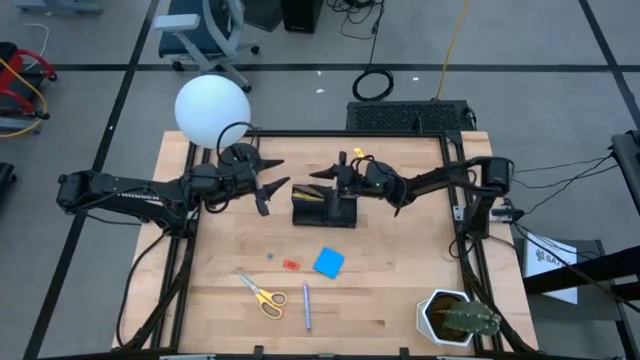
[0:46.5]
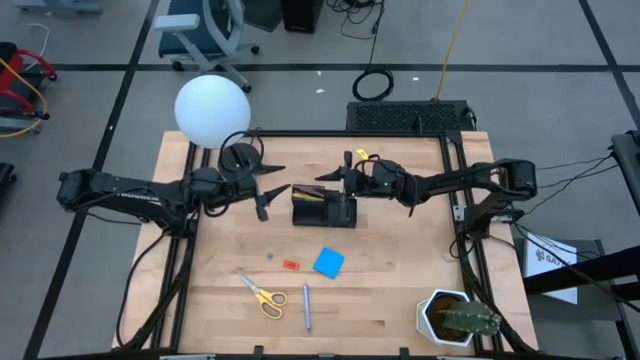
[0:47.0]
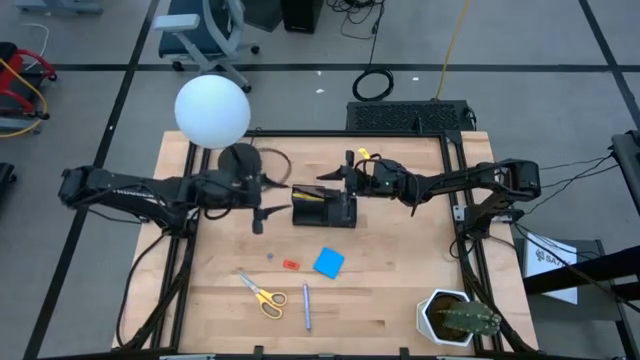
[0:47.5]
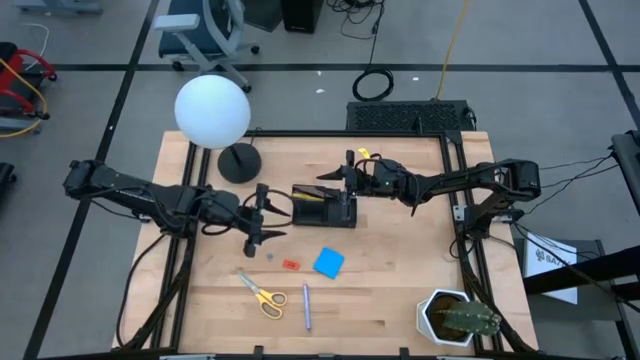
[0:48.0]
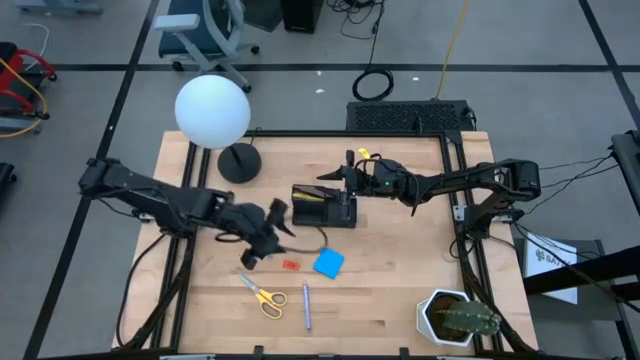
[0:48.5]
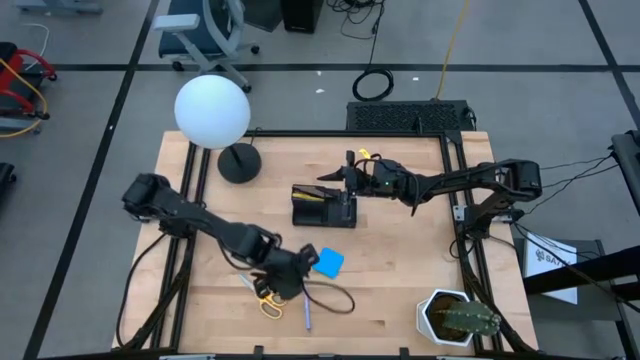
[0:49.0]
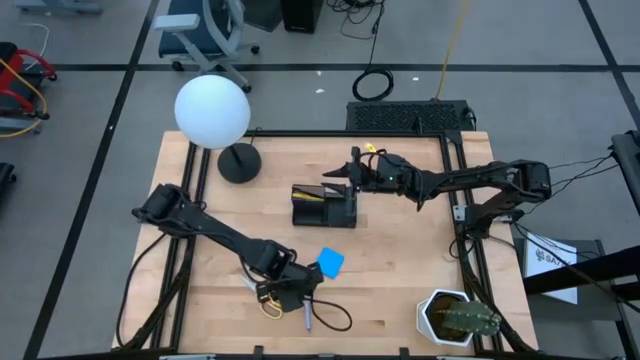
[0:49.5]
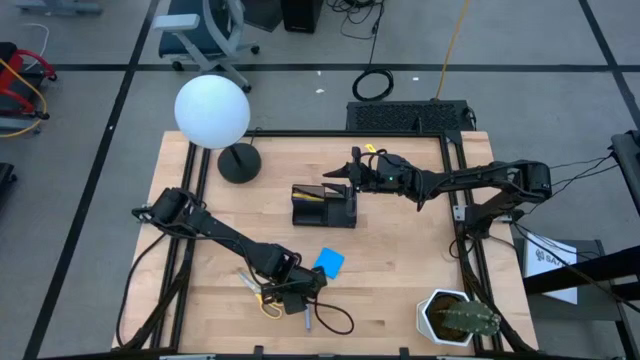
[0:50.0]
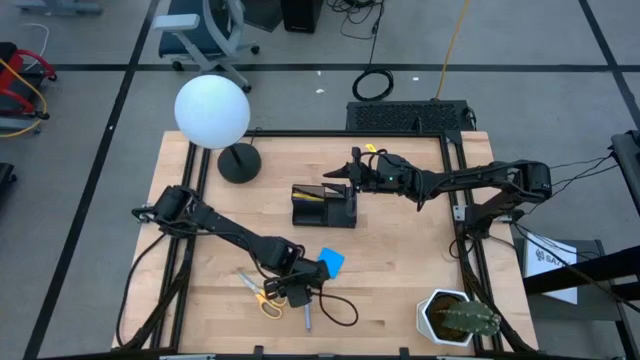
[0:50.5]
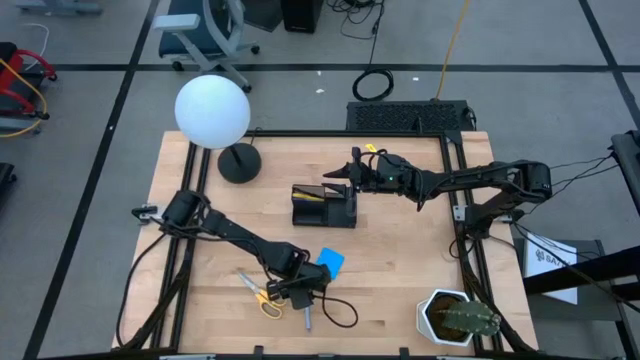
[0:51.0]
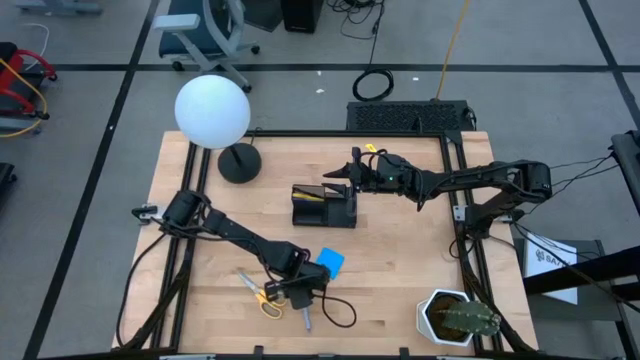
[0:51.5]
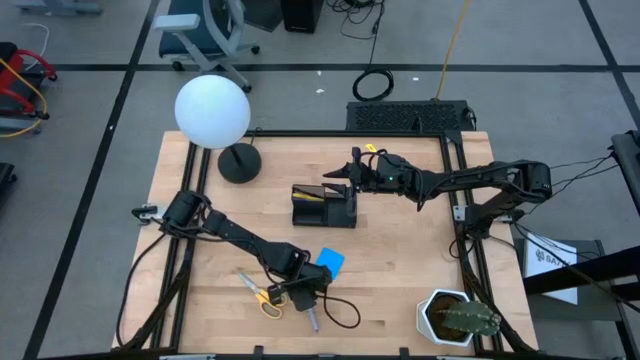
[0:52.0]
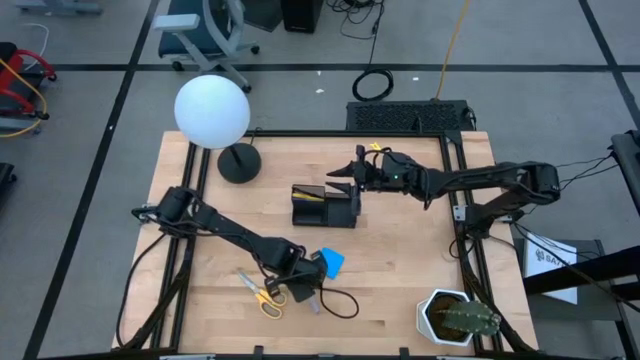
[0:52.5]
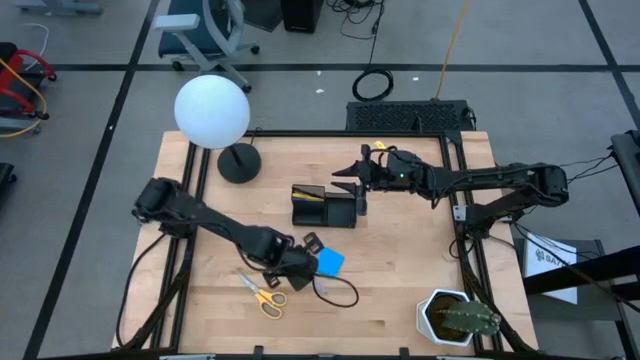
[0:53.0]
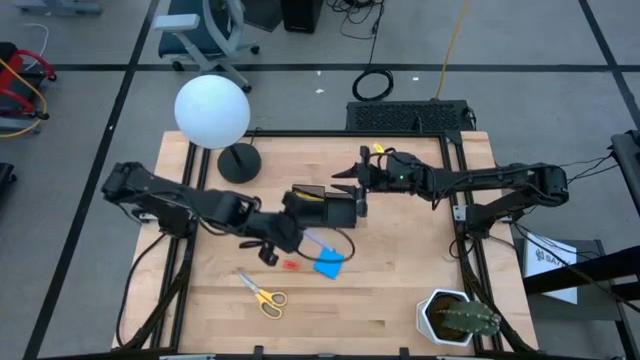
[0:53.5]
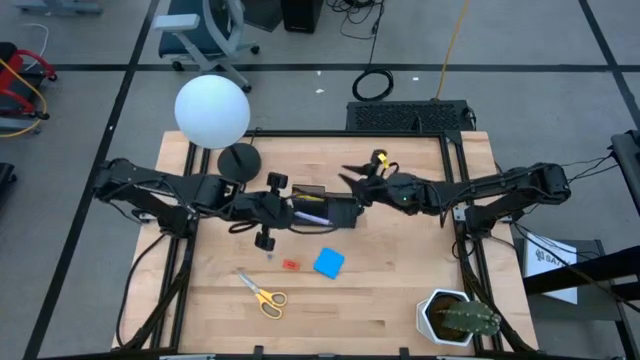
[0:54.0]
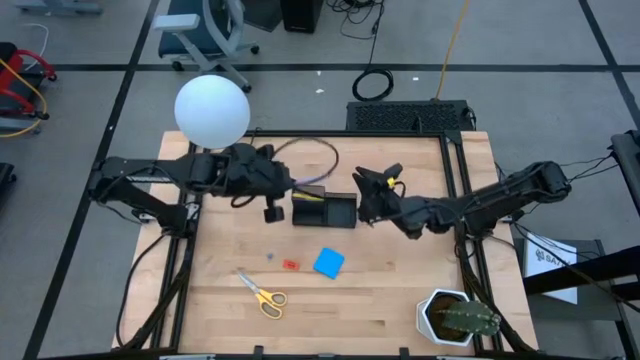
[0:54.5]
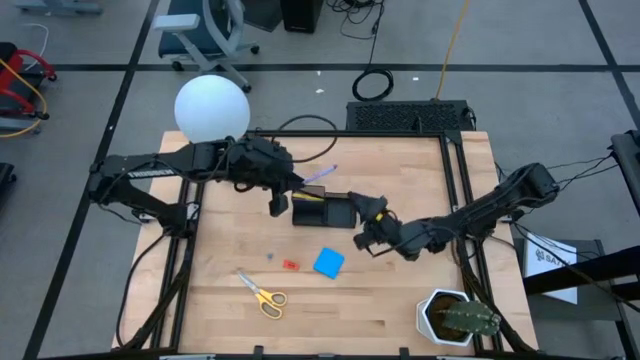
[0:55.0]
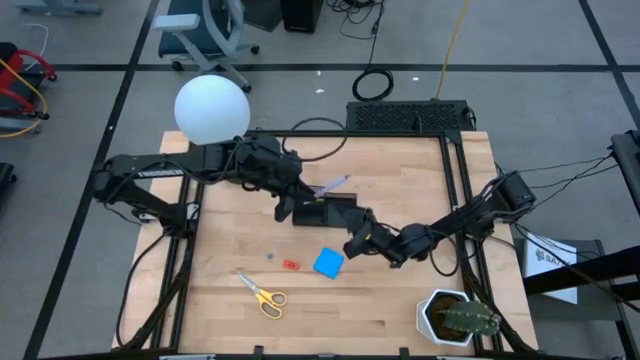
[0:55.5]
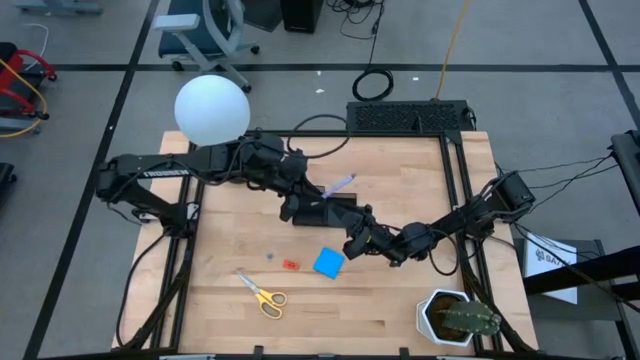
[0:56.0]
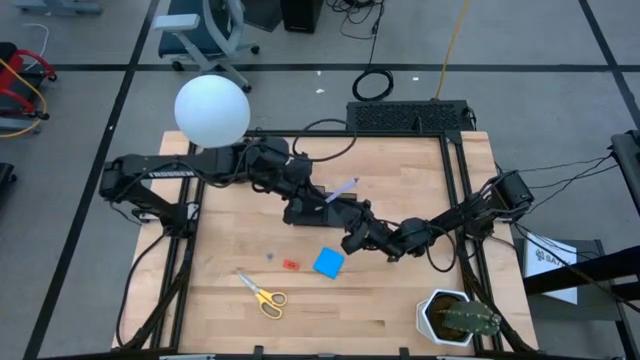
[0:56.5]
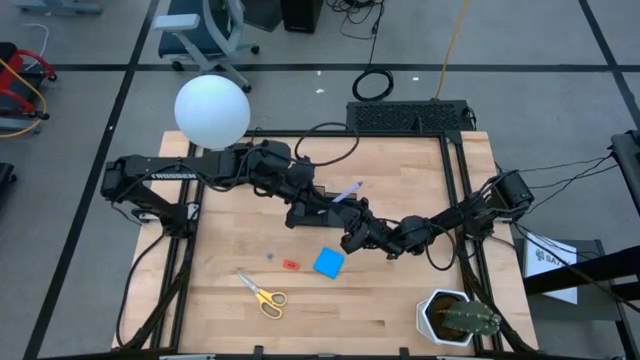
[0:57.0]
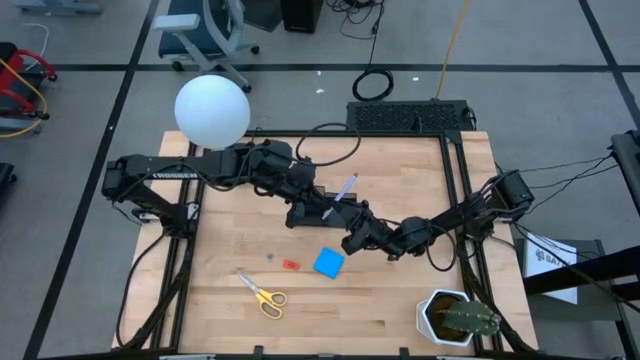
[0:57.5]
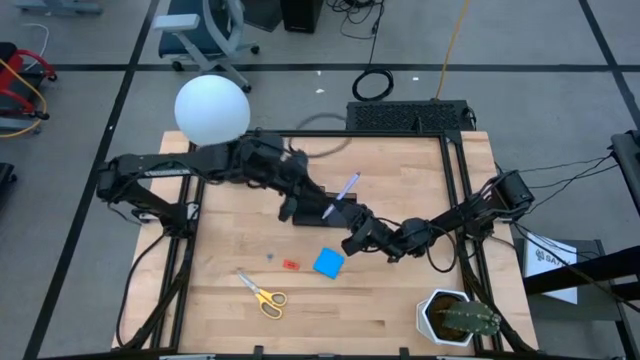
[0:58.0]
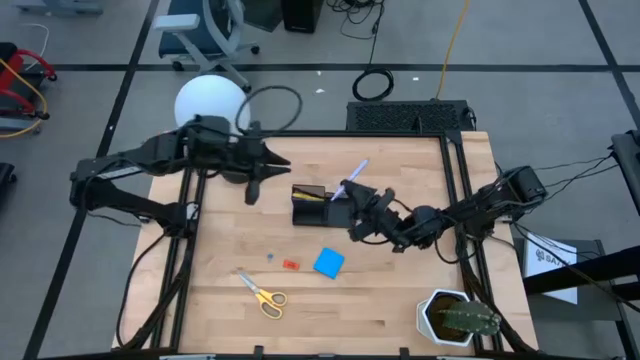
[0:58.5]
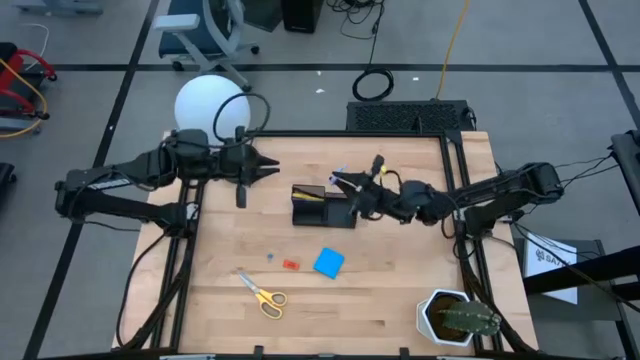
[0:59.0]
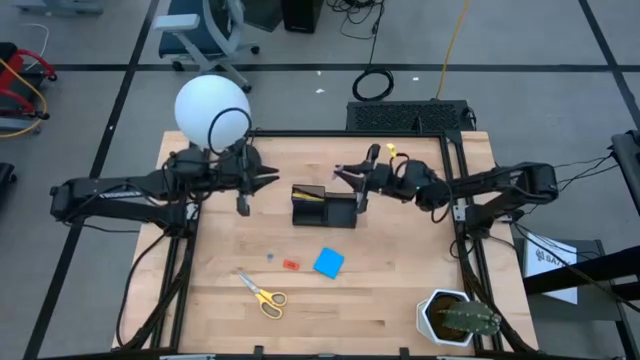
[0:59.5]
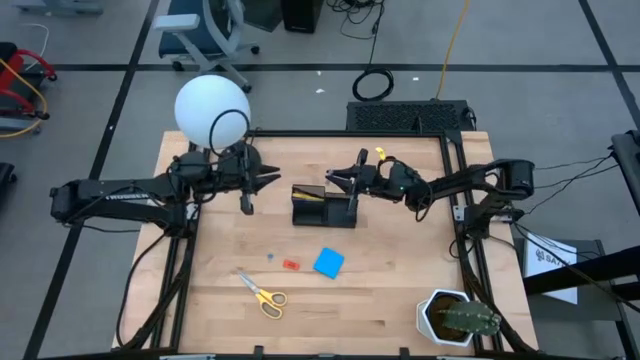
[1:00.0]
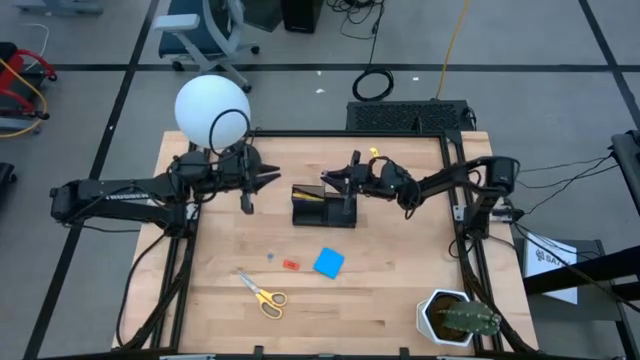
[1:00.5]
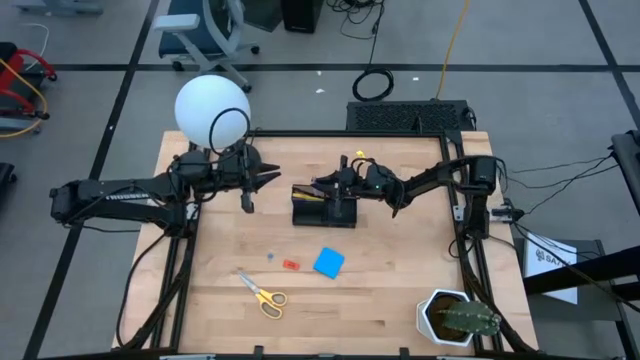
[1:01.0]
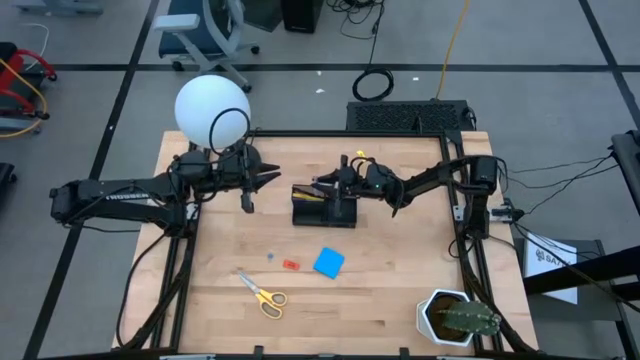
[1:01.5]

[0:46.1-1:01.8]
Task: Pick and place office supplies into organizer
Put the white pen into the desk organizer

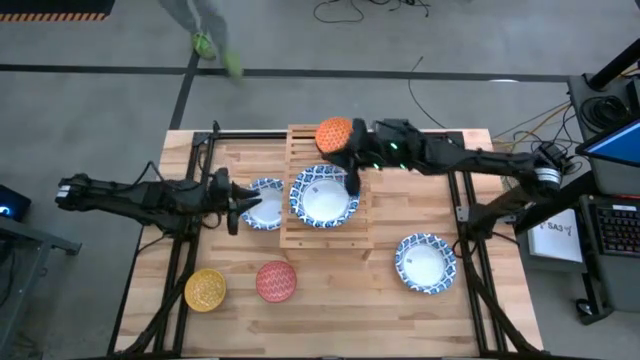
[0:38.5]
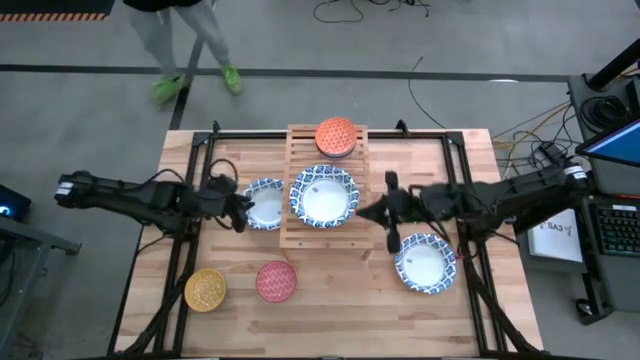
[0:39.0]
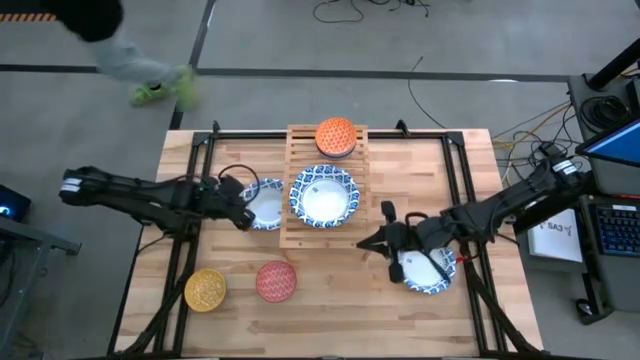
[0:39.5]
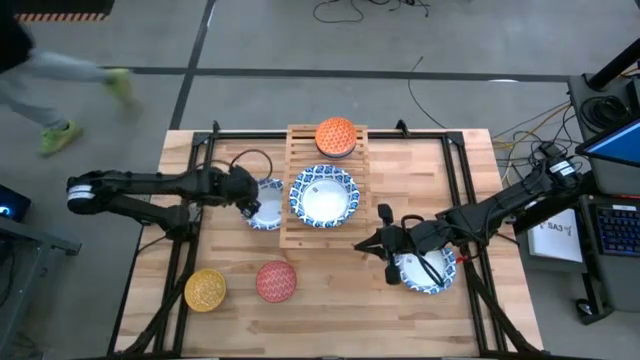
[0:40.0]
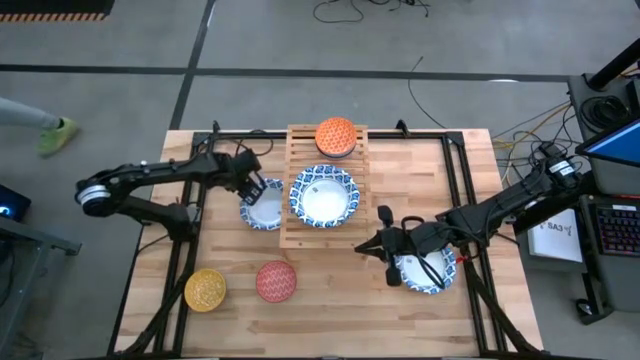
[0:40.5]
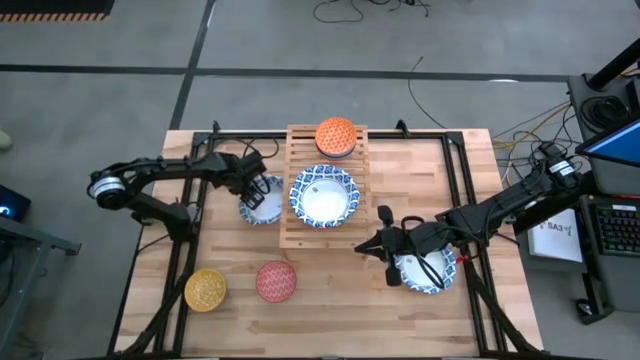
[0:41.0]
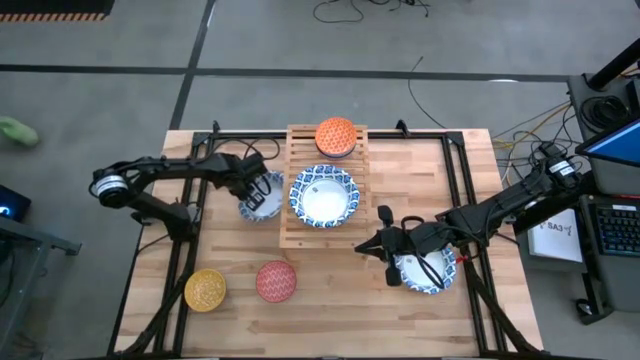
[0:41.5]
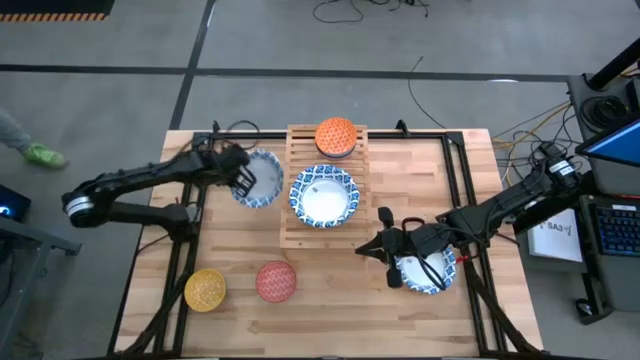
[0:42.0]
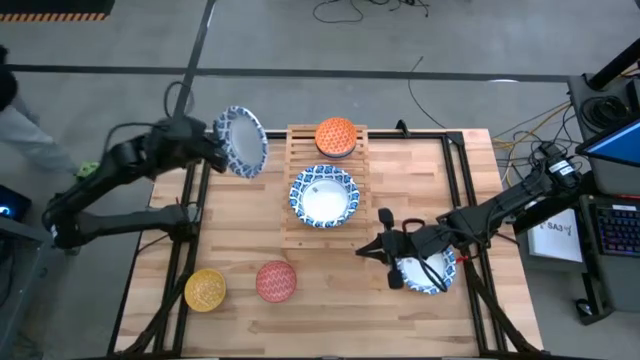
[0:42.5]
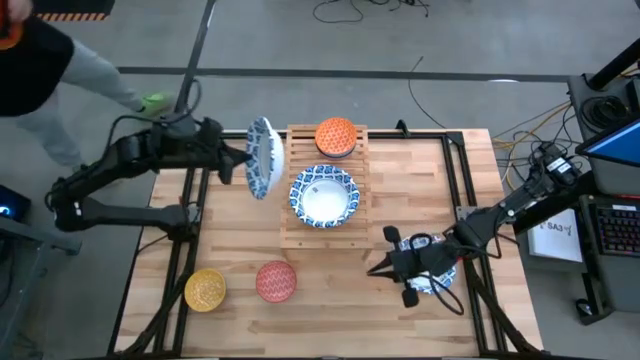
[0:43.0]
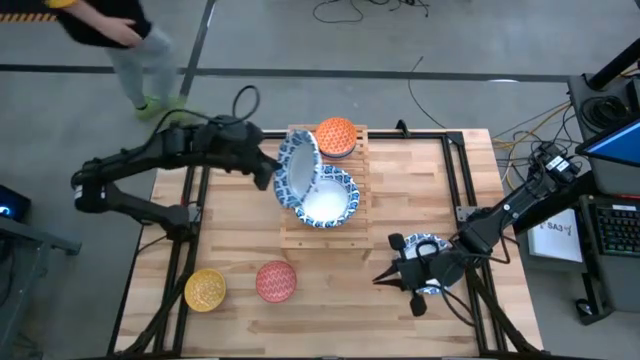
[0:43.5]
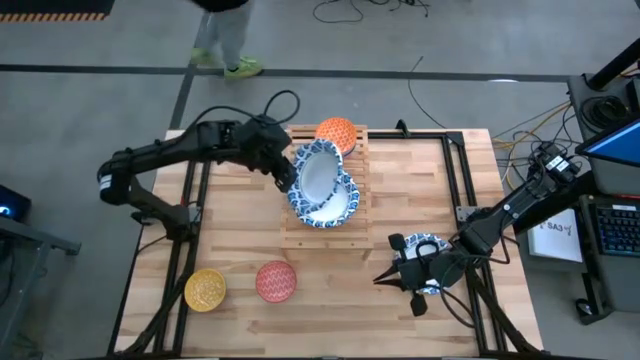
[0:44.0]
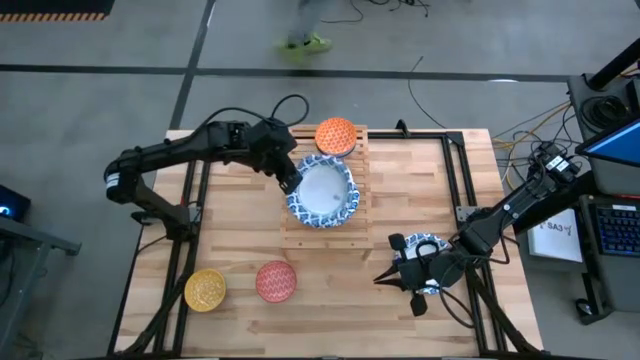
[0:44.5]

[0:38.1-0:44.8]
Task: Place and stack bowls onto a shelf
Stack the left white patterned bowl on top of the white patterned bowls on the shelf
